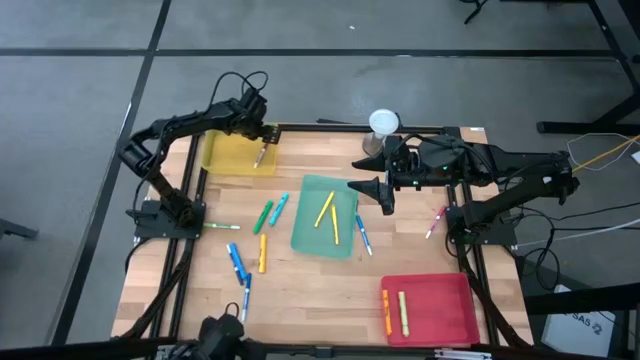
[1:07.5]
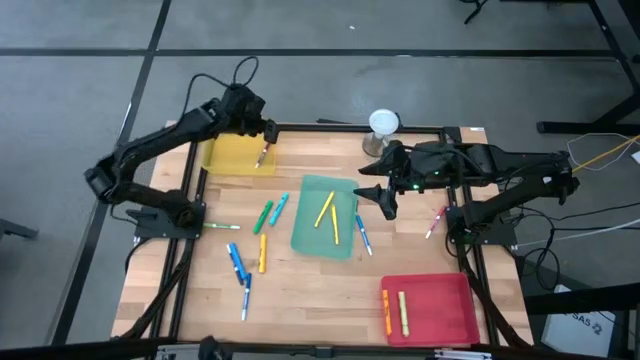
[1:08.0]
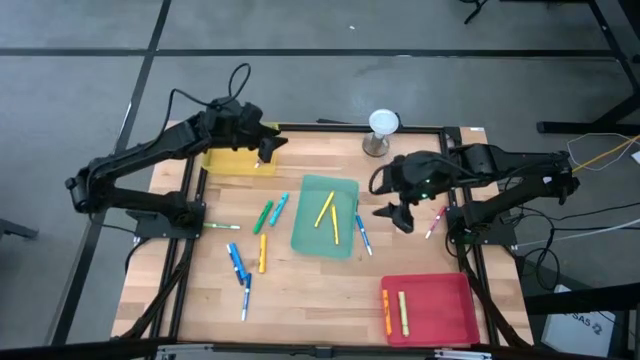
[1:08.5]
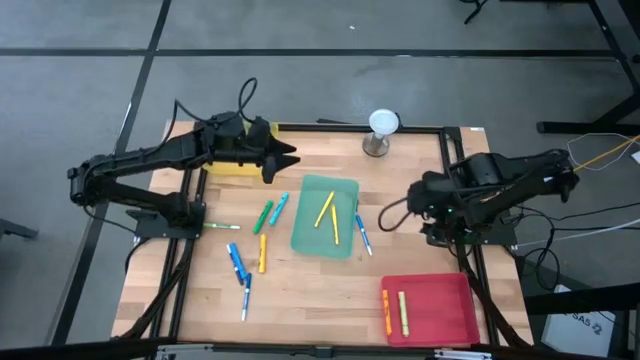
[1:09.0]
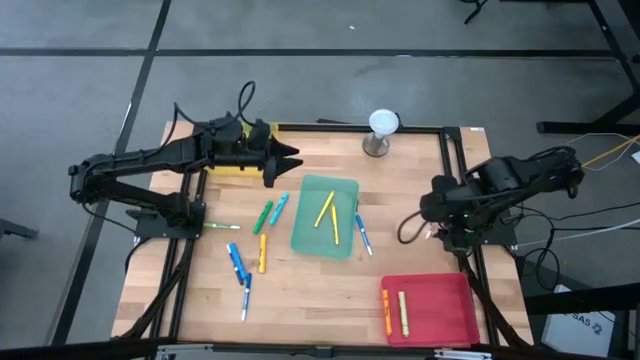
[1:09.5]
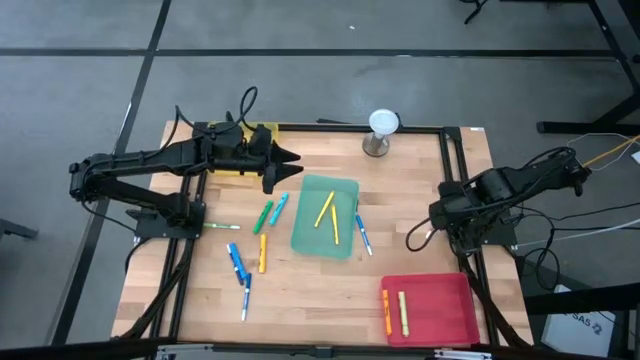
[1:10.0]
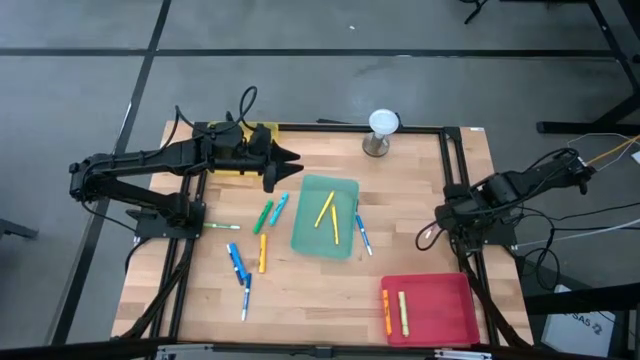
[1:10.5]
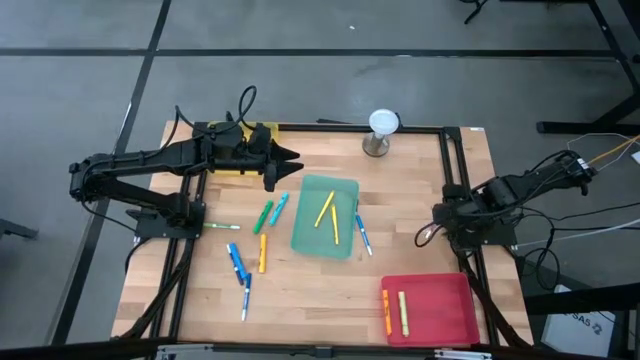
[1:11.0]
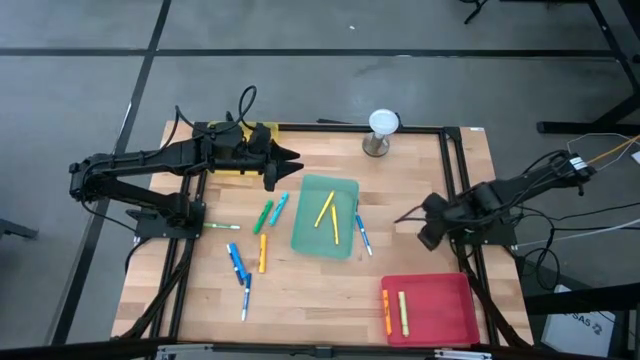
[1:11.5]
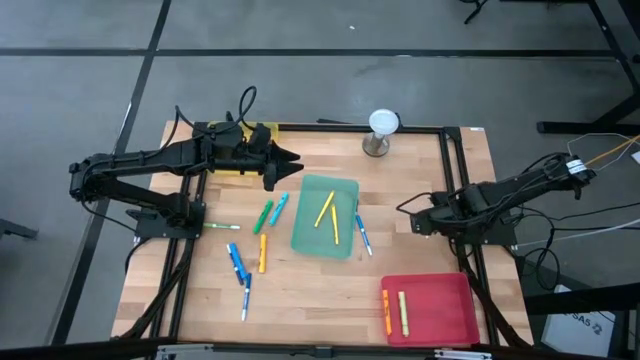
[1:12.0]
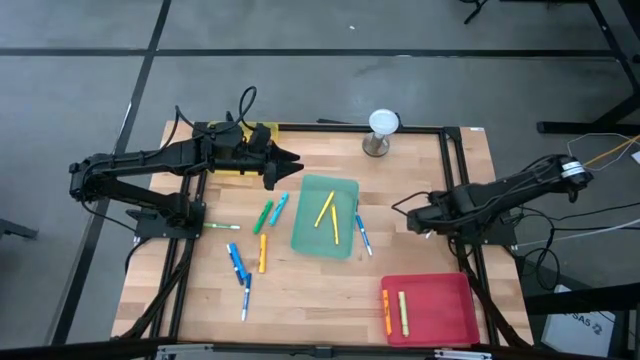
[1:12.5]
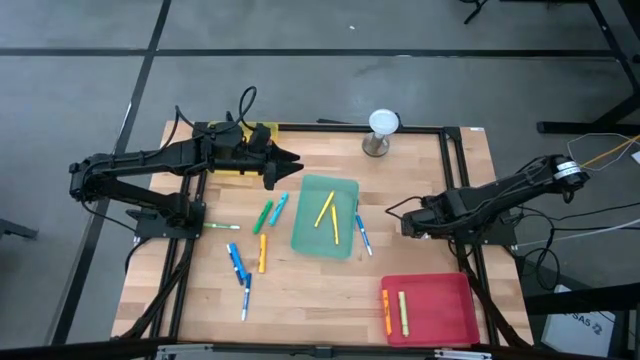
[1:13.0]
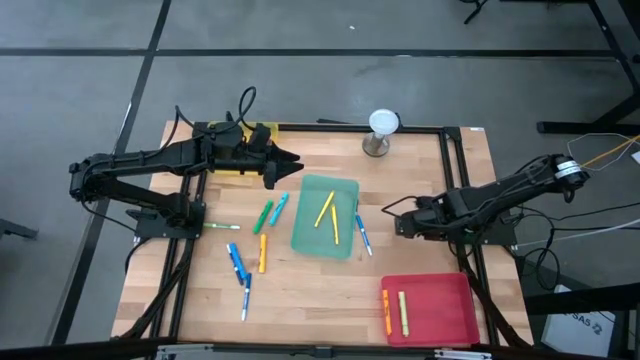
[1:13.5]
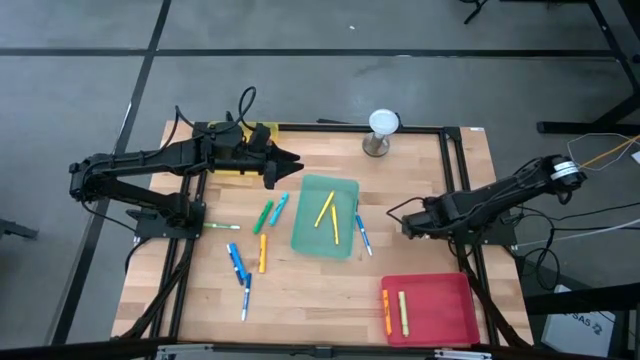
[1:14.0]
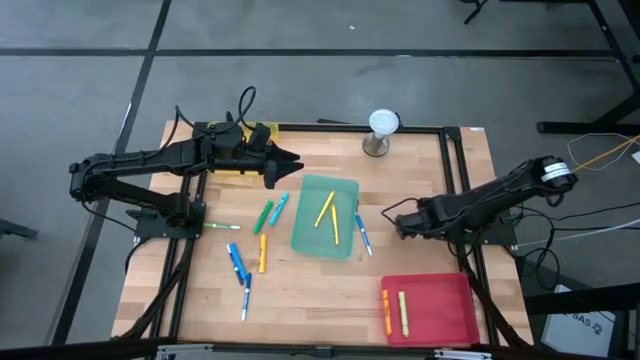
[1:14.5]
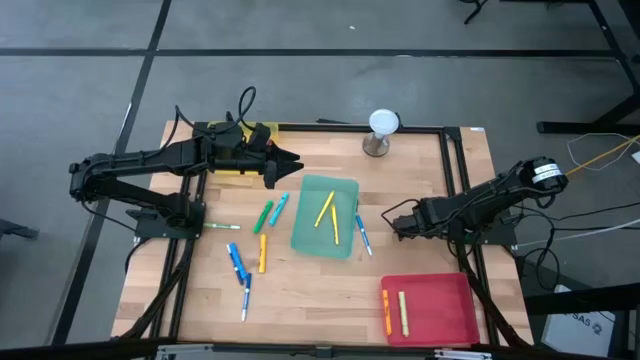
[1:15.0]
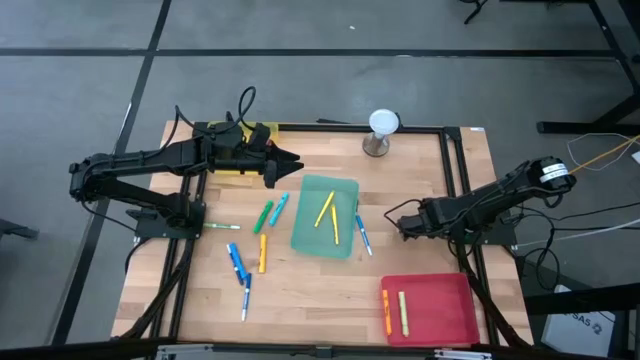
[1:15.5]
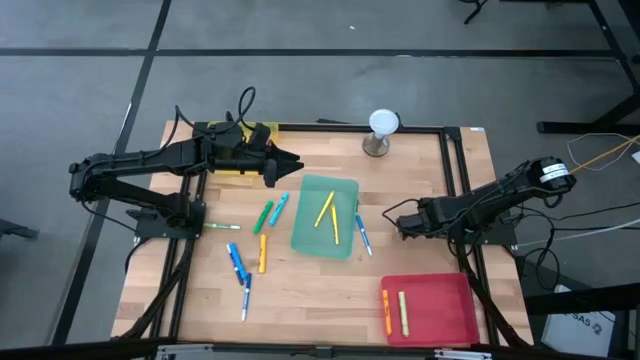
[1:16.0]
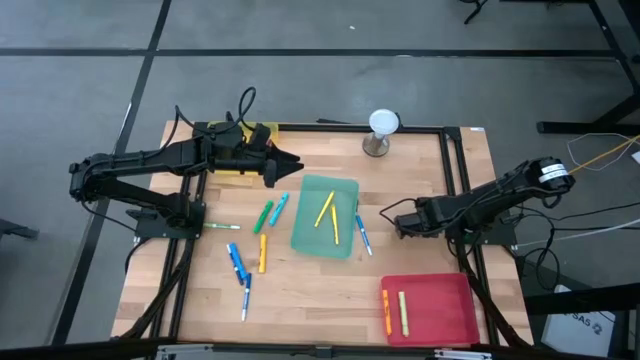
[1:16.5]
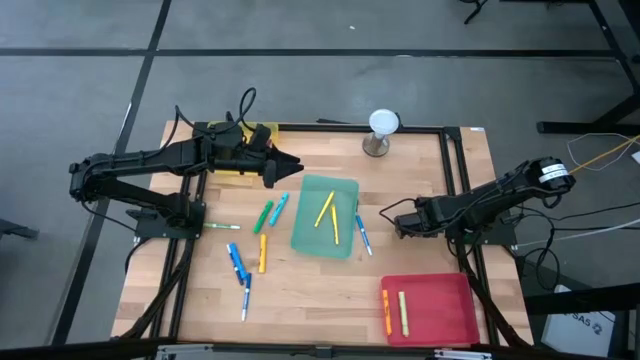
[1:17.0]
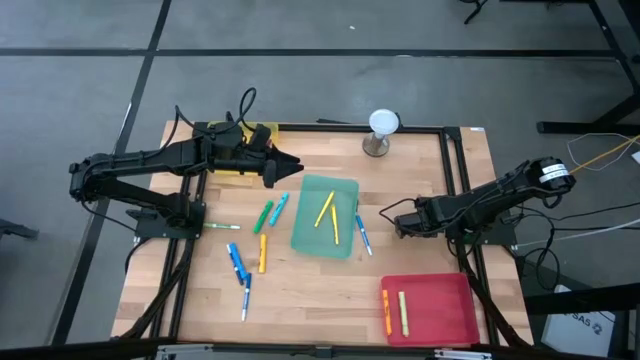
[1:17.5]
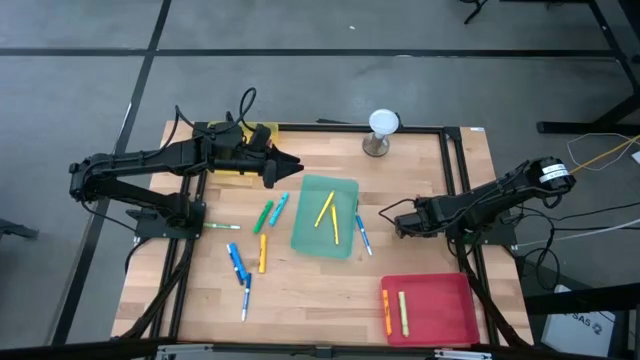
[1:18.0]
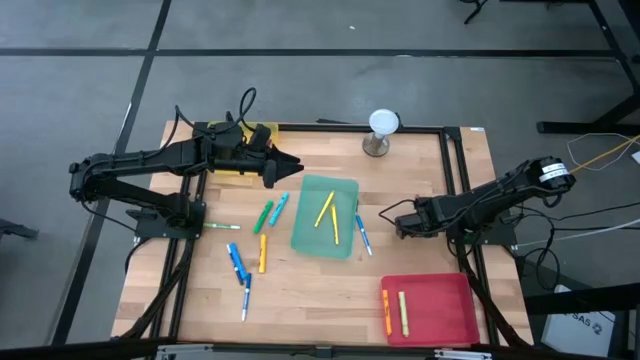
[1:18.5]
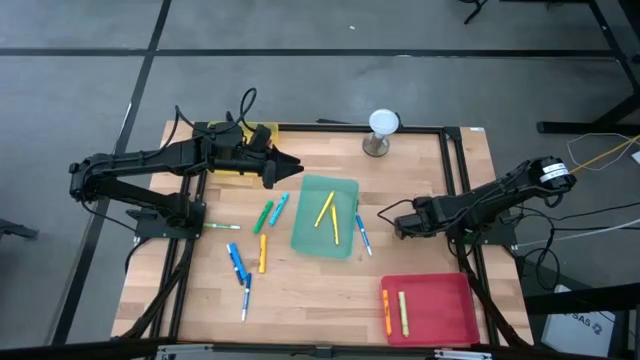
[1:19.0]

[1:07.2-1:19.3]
Task: Pick & Place Markers
Put the pink marker pen into the yellow bin

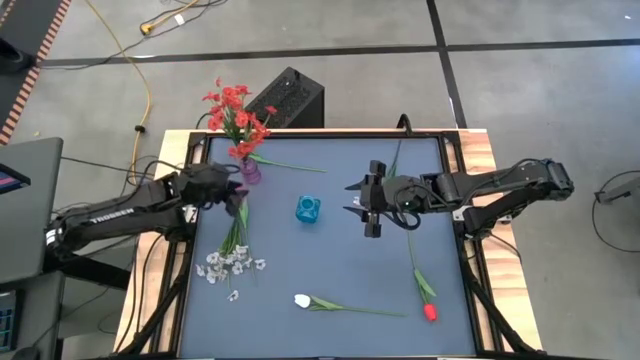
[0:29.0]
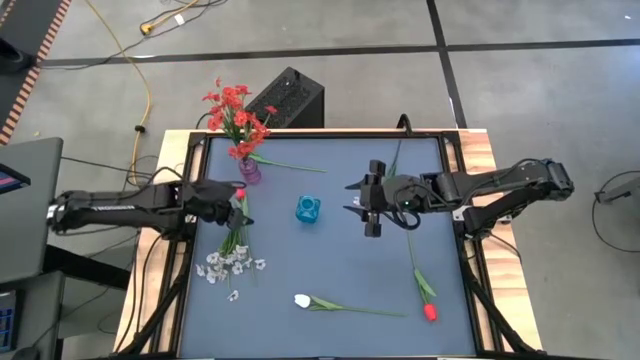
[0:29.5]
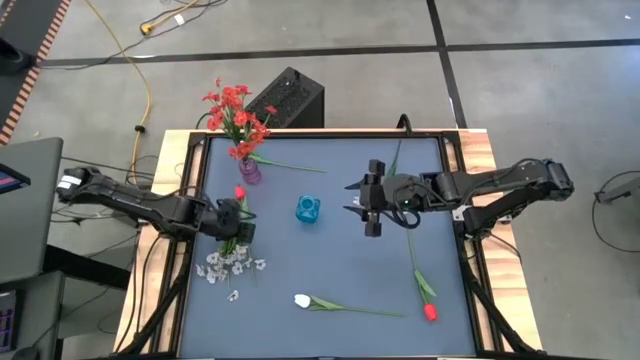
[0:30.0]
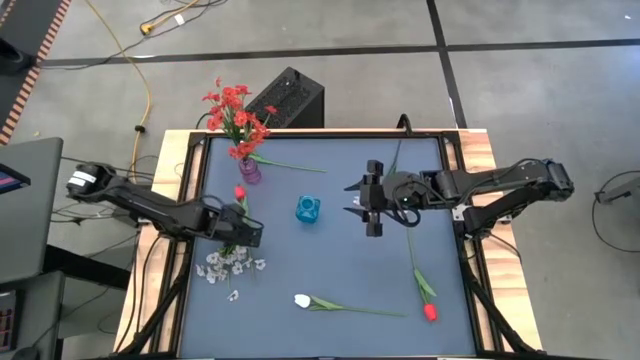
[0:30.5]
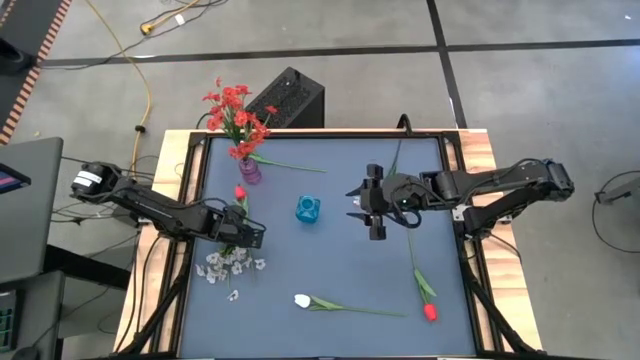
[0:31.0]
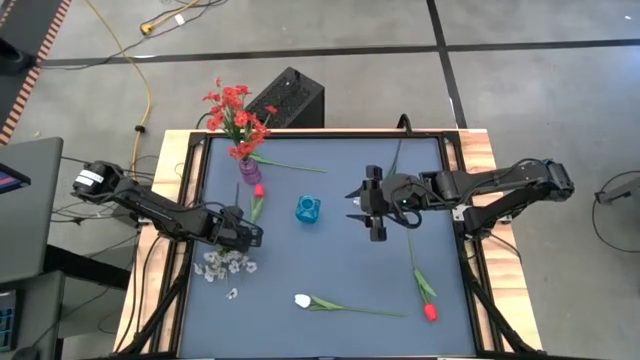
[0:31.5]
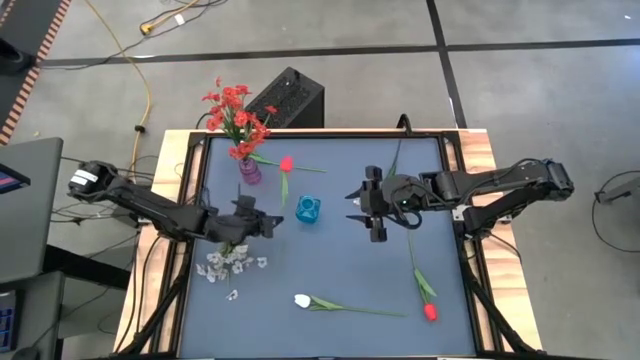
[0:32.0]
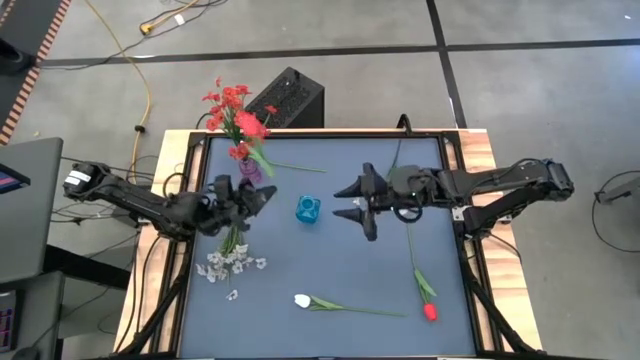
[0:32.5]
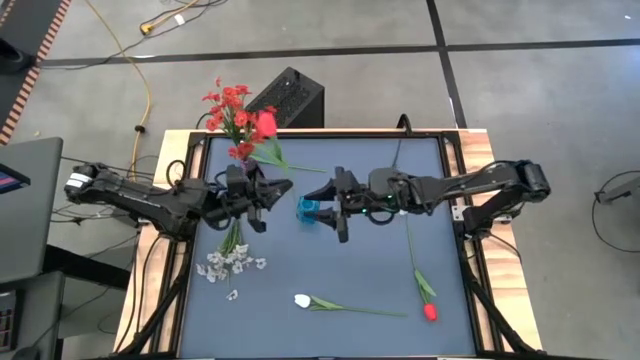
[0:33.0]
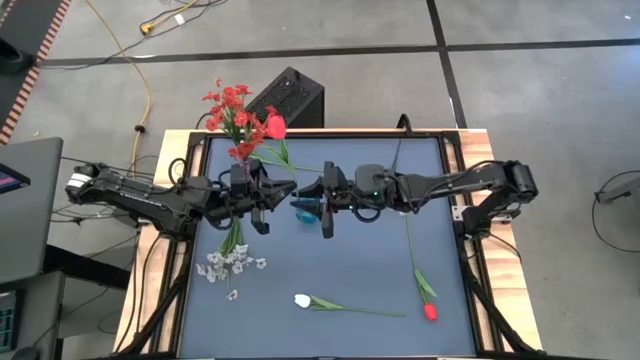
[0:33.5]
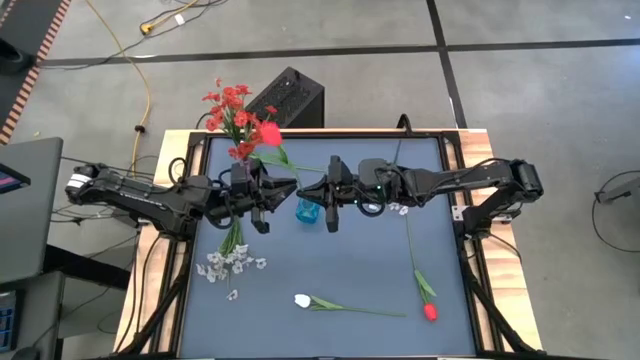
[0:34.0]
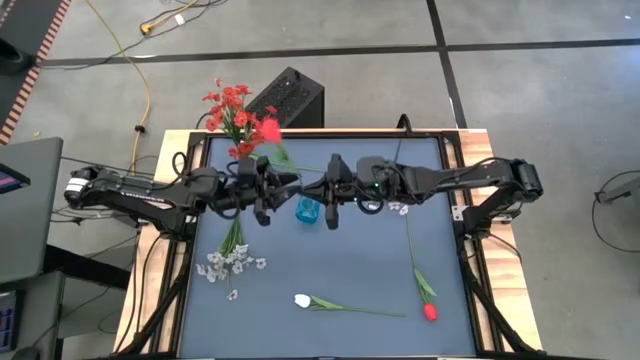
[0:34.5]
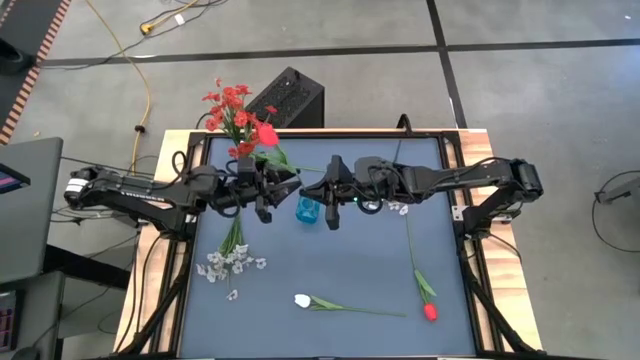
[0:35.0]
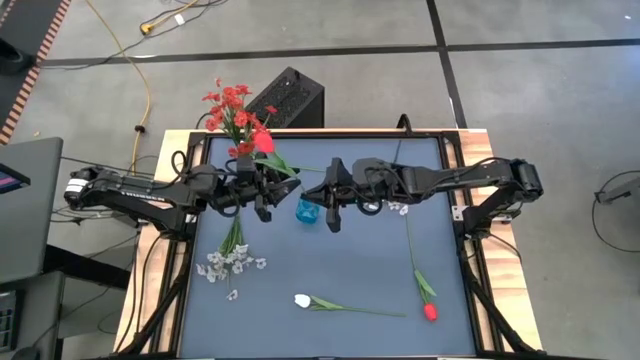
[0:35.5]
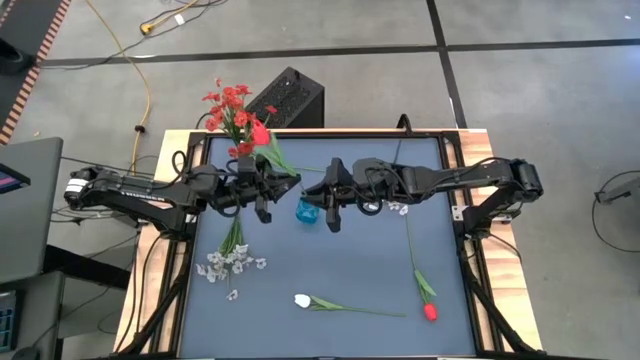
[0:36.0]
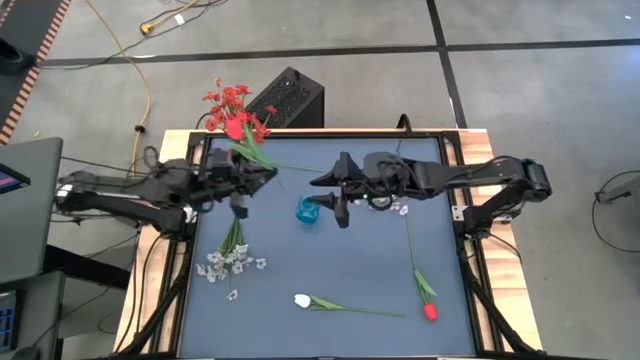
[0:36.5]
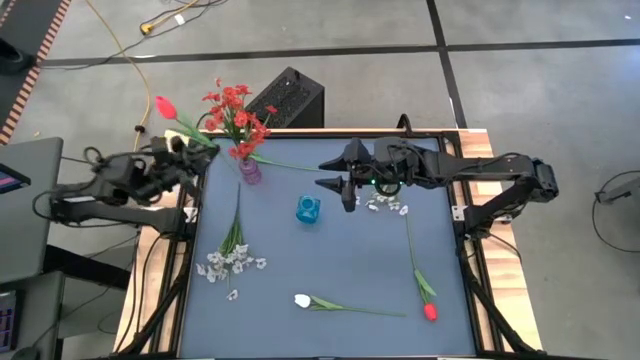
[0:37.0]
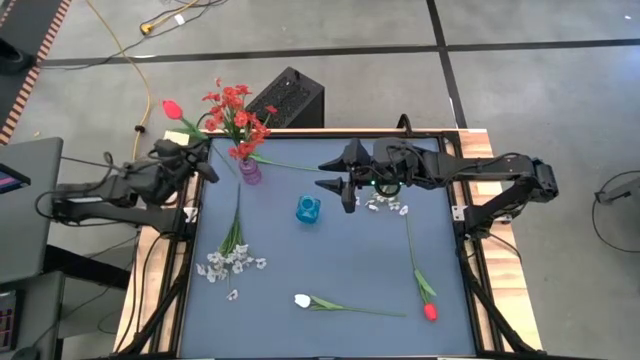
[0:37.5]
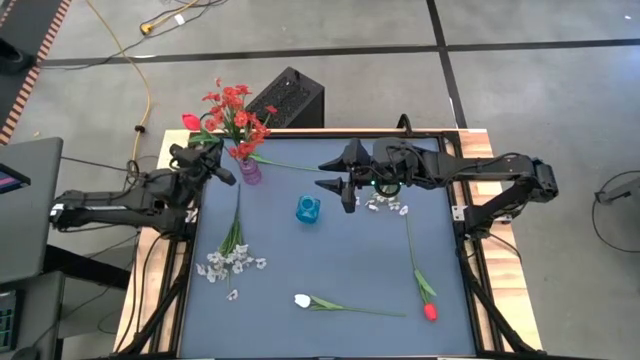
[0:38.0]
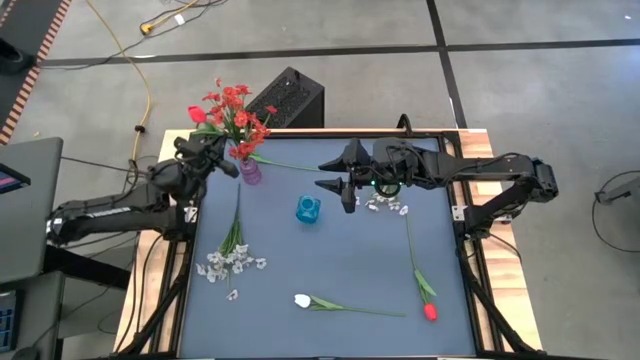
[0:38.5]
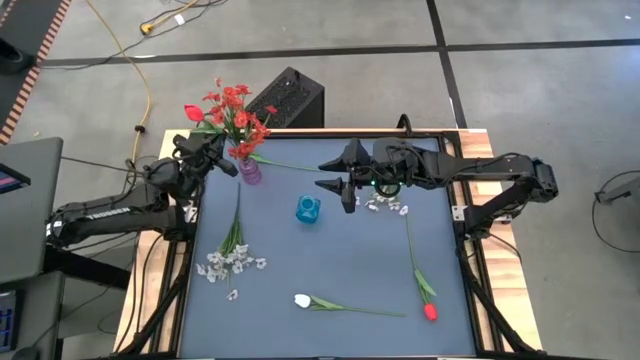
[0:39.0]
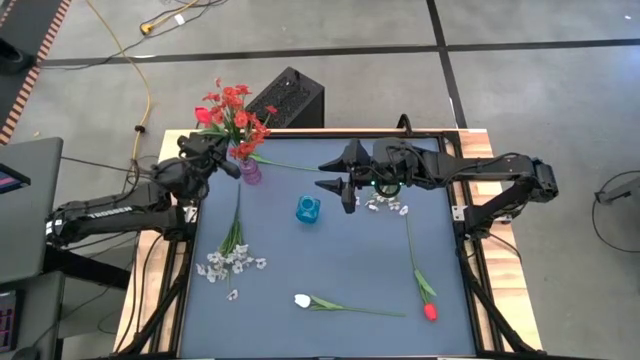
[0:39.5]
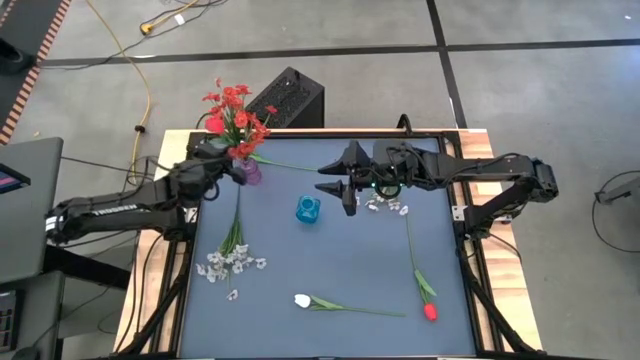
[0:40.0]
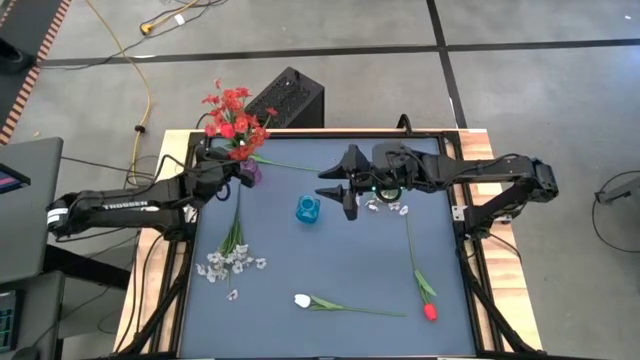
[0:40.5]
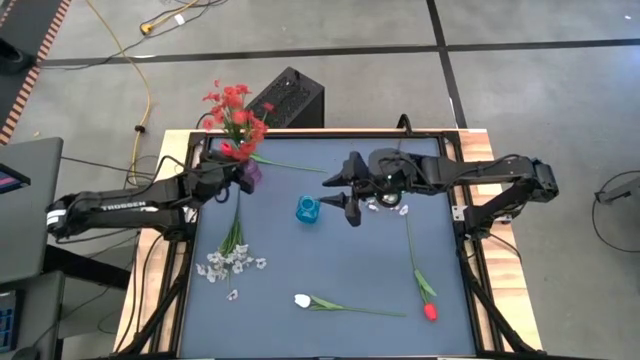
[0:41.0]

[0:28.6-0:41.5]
Task: Sort flowers into vase by color
Put the left red tulip into the purple vase
